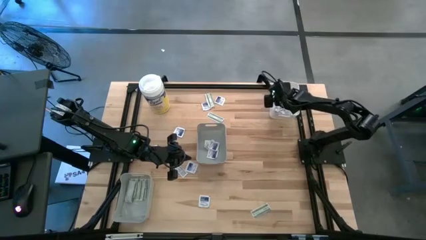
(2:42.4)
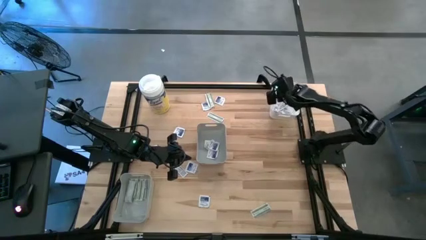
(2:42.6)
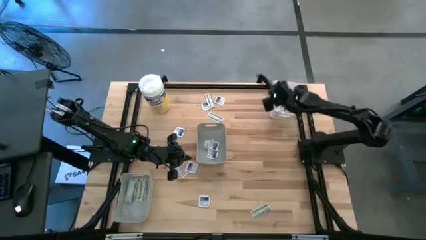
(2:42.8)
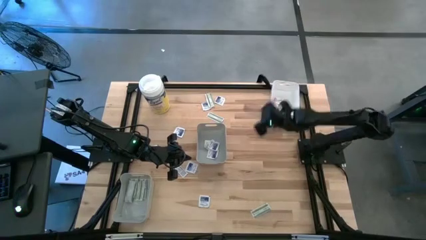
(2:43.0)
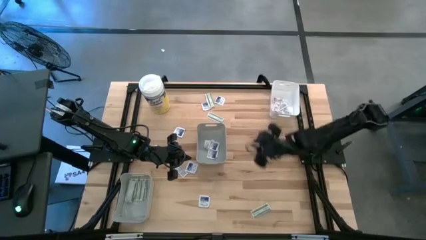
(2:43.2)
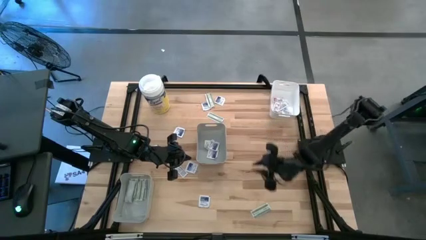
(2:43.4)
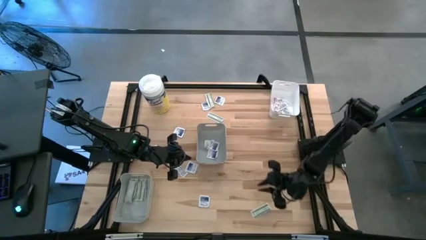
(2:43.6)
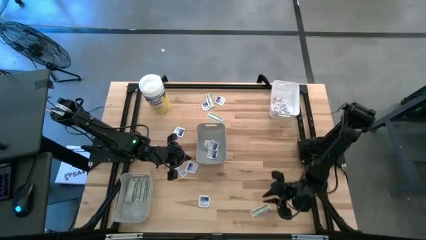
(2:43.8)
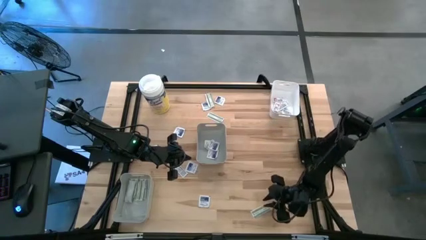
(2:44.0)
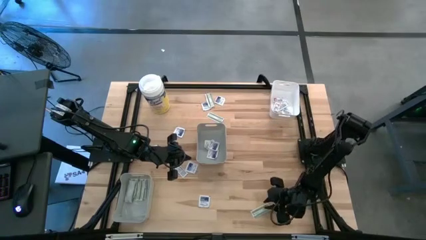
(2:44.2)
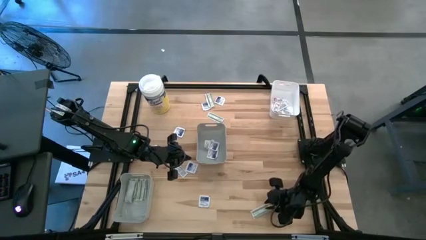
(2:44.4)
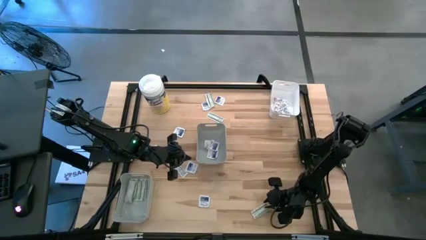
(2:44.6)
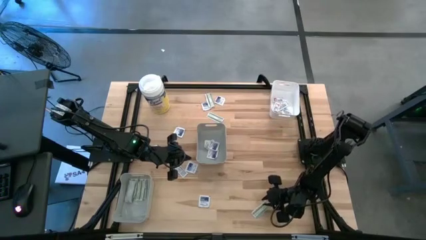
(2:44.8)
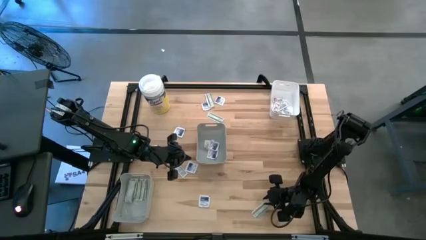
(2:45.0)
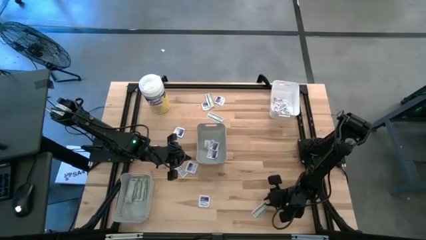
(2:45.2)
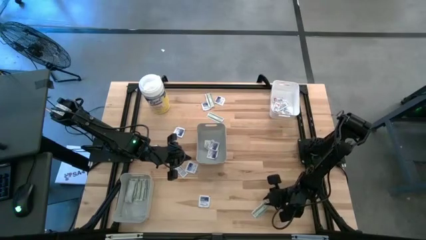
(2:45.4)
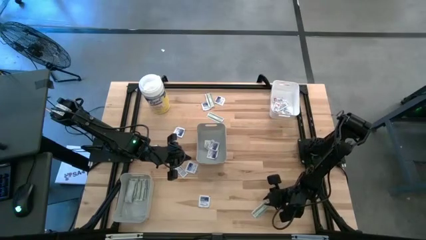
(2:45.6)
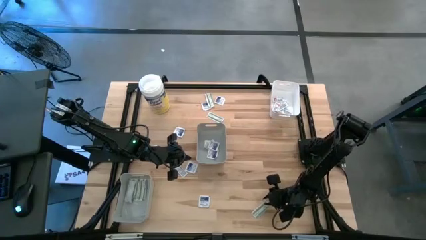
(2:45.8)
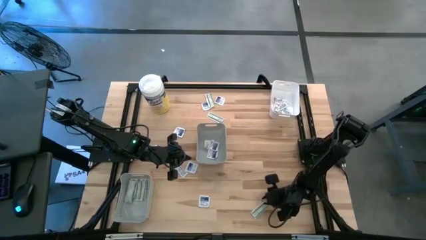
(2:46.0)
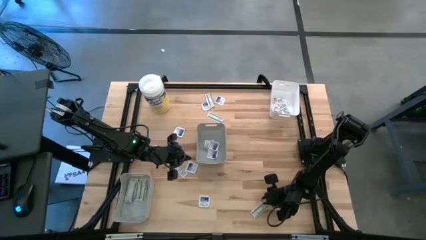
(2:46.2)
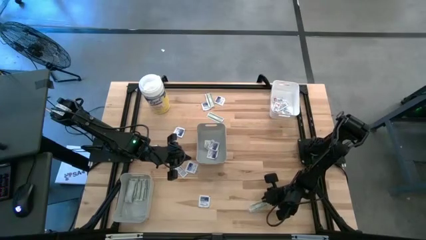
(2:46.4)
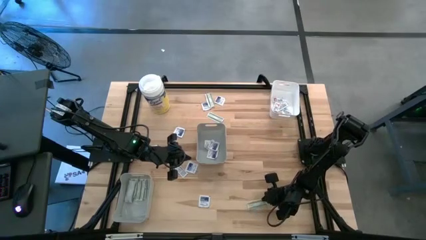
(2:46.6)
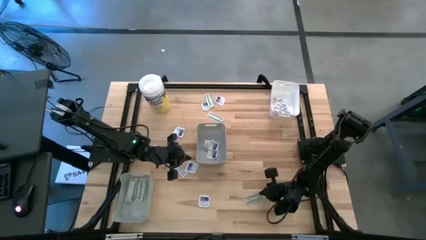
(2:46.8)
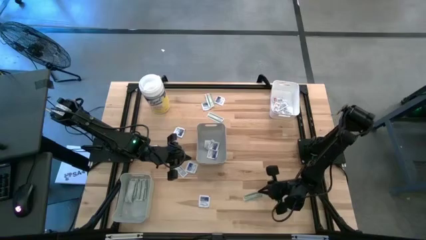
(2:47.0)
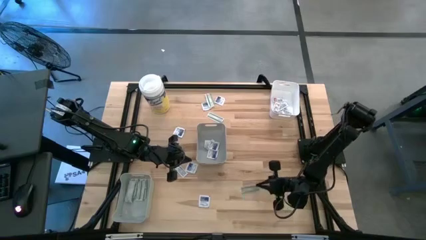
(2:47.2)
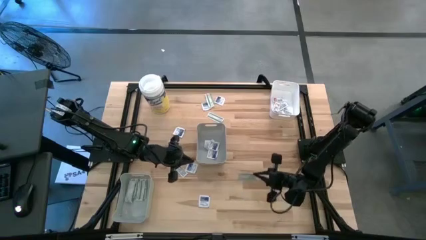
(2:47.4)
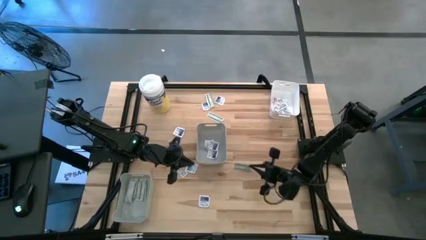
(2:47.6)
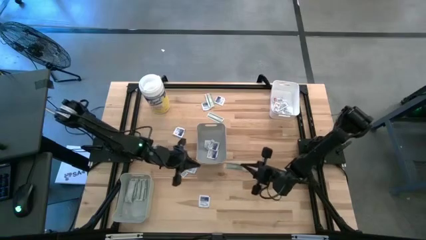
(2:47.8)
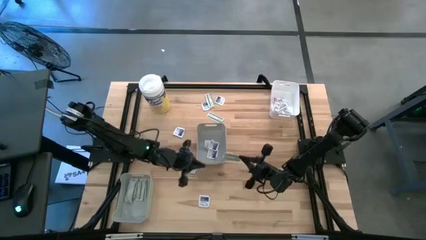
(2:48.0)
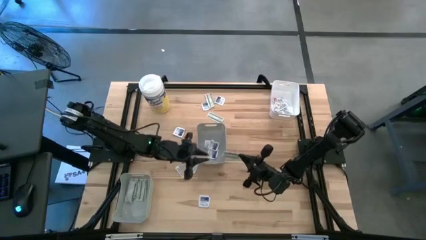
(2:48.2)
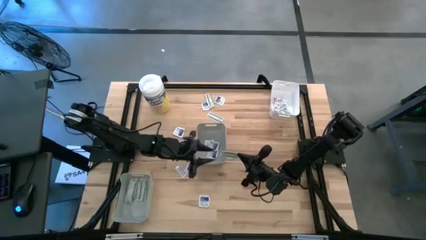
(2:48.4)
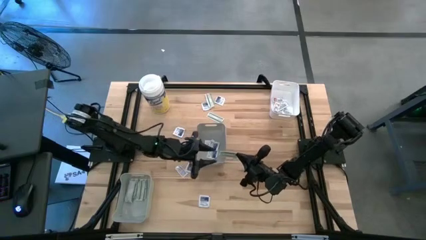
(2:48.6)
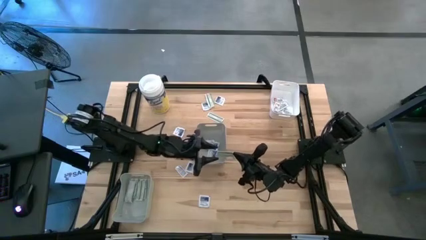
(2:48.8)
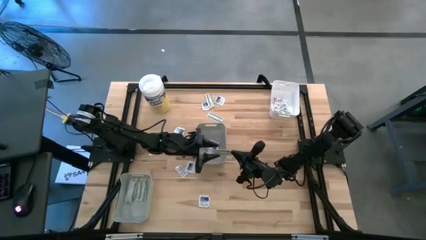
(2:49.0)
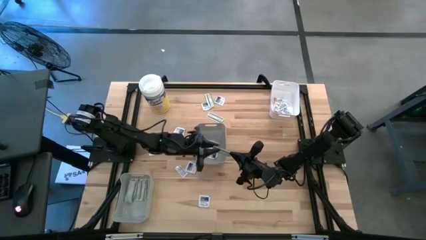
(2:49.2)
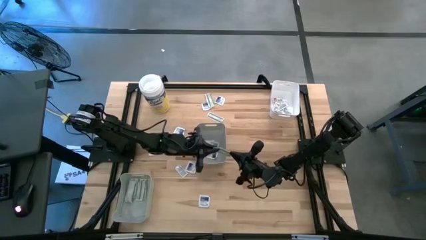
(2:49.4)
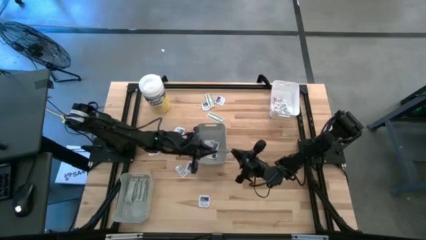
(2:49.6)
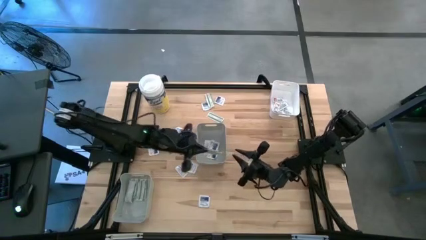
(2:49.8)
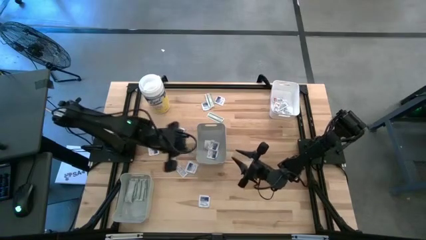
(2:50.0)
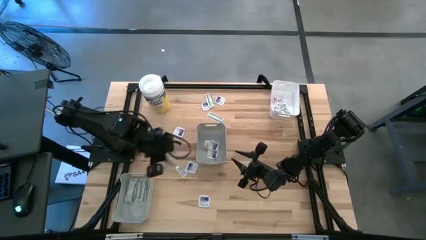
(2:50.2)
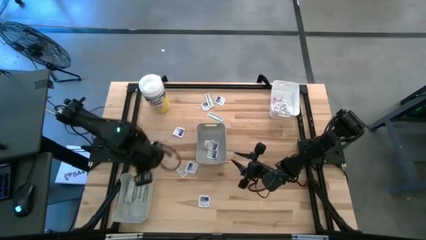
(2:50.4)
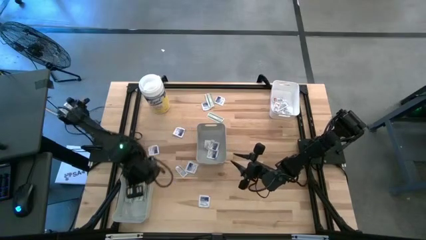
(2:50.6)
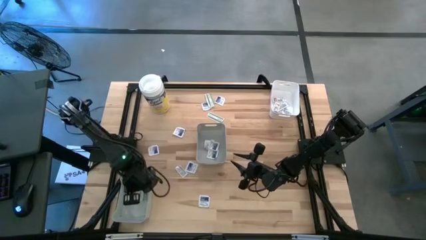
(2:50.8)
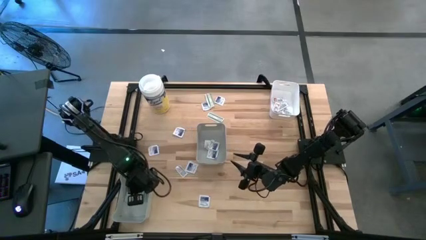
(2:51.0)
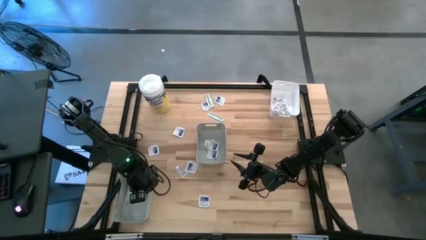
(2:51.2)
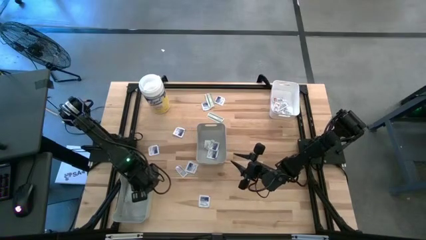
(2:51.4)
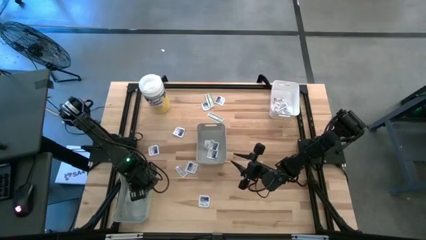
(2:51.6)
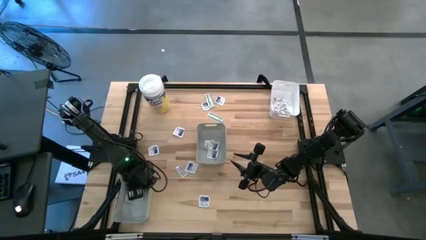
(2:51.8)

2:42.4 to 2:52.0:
Task: Pick & Place First Aid Supplies
Put the green pad into the bottom gray bin

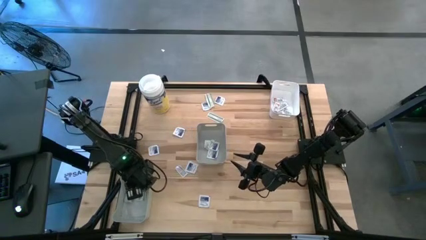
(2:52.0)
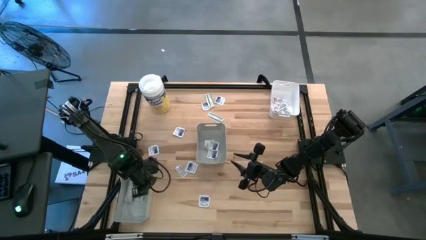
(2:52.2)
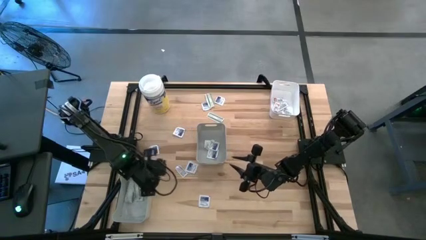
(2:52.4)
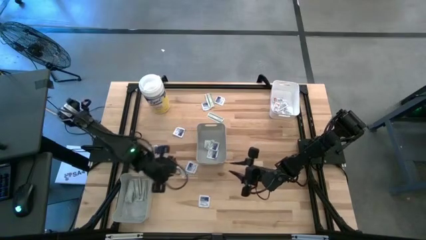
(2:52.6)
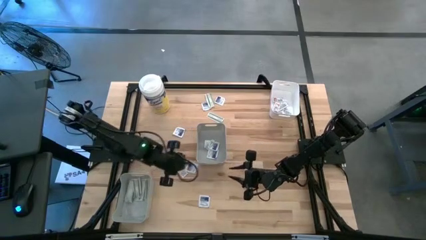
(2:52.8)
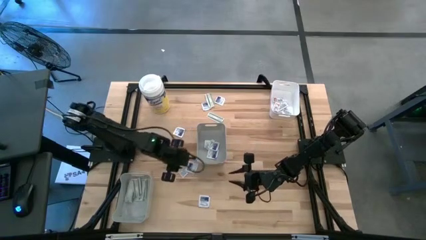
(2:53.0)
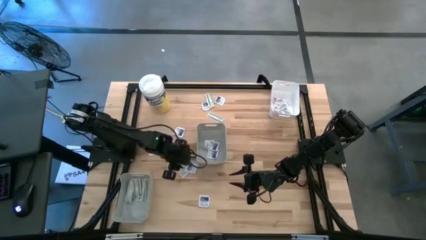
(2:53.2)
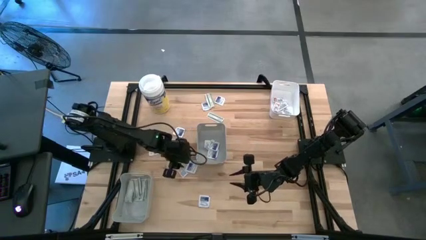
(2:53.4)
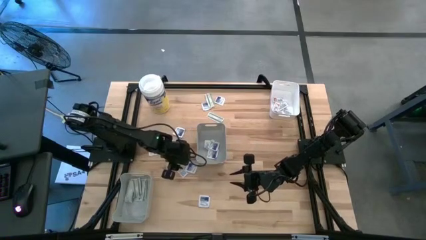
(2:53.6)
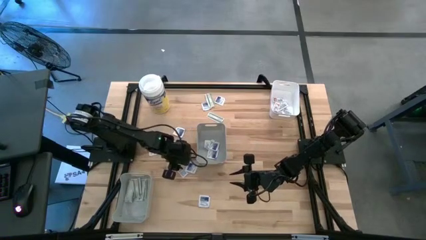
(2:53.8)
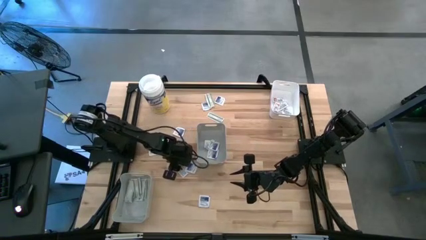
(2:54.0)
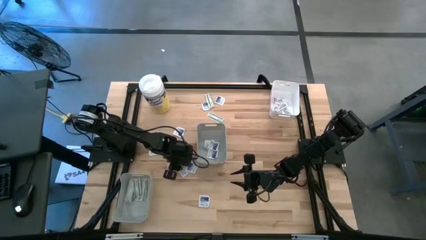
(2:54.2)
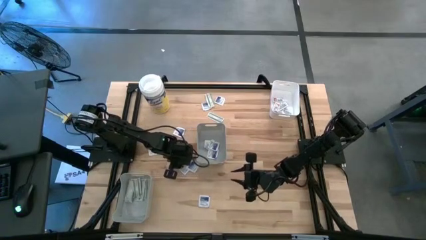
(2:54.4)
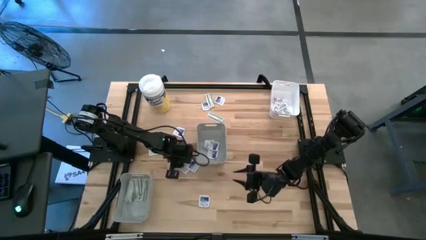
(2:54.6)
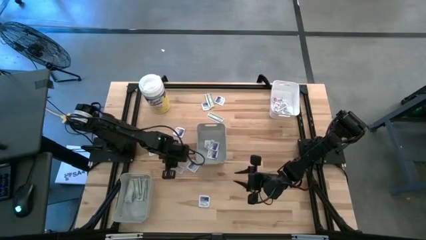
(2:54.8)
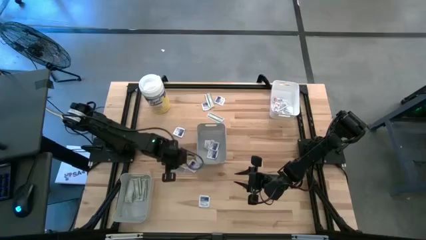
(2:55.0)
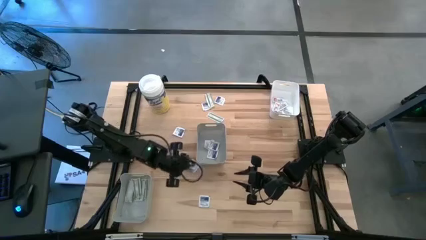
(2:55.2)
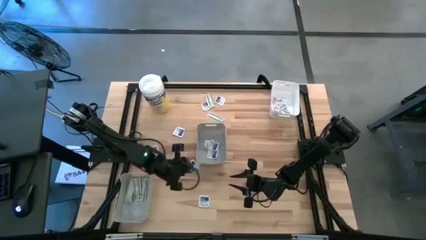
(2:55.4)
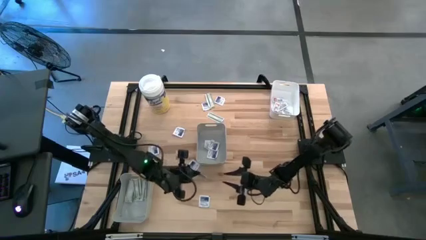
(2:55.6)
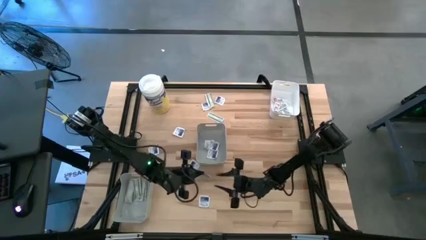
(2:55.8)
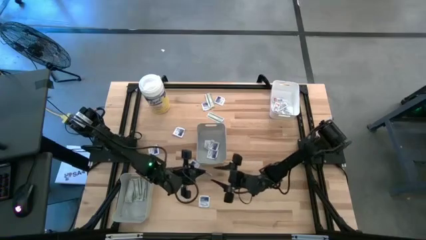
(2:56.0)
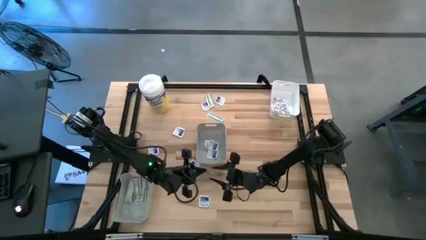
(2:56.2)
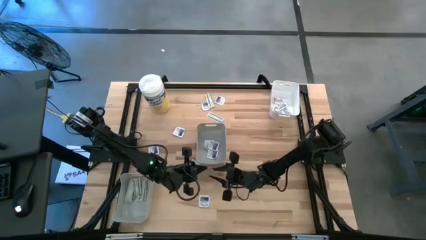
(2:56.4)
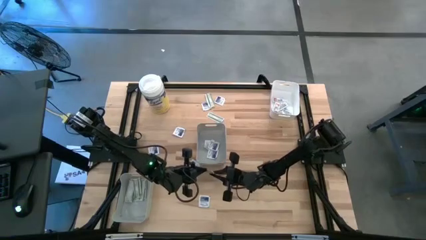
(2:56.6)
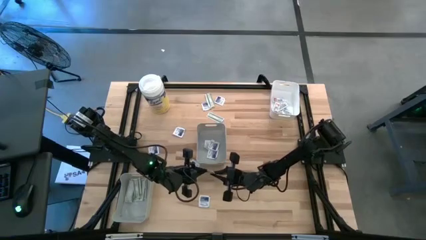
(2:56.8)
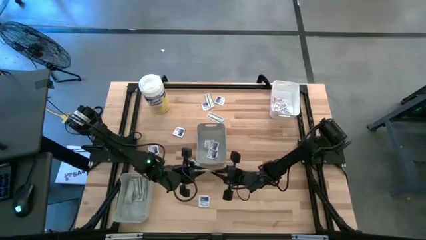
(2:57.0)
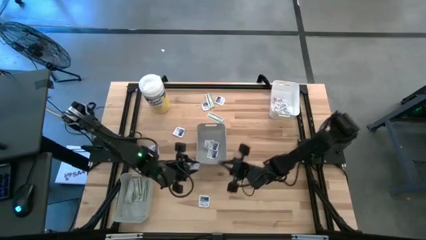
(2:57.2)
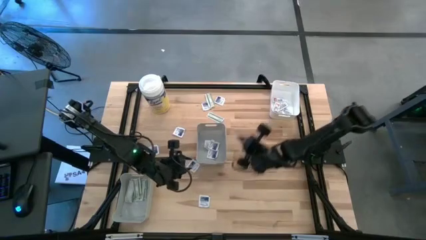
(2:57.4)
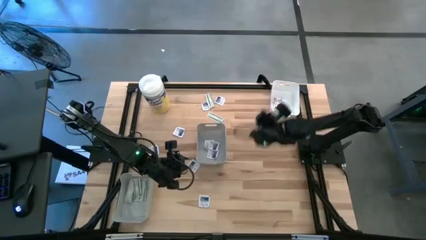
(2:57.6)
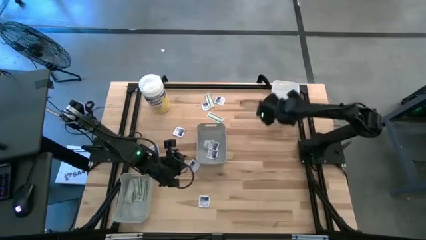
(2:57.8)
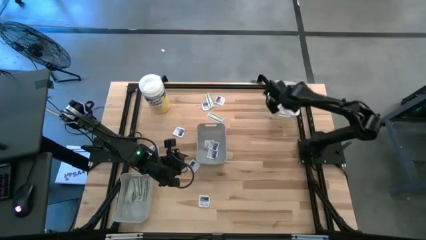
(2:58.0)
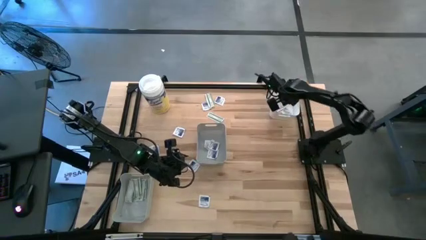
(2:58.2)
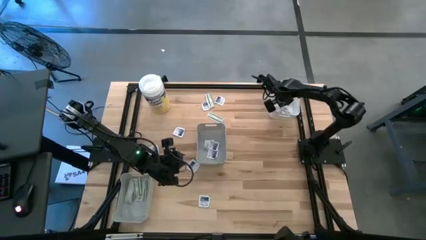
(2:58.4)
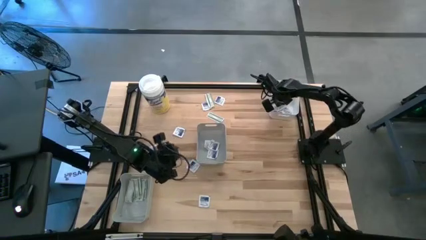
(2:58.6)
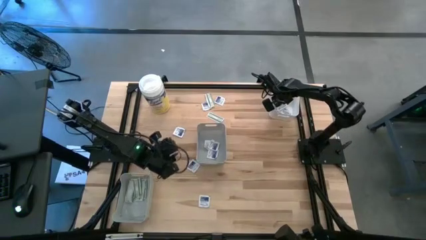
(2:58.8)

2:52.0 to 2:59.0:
Put the orange pad into the white bin
